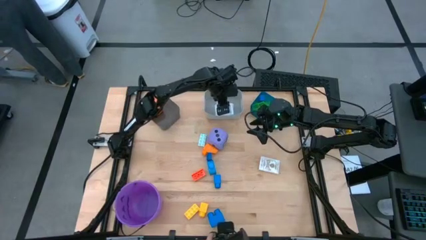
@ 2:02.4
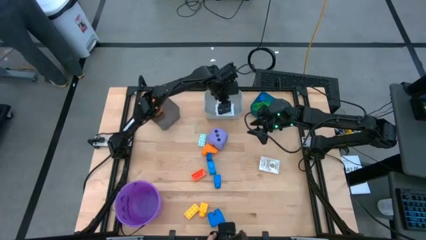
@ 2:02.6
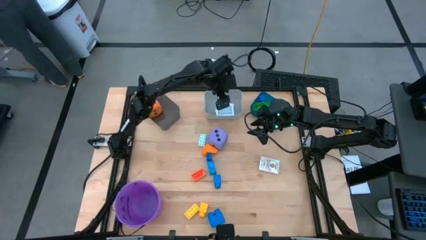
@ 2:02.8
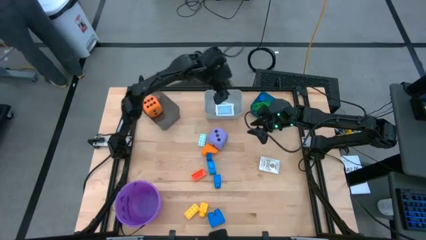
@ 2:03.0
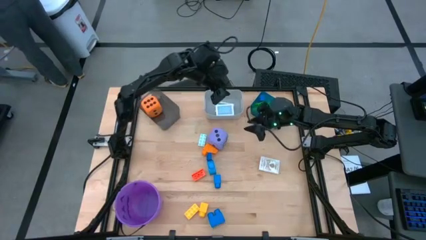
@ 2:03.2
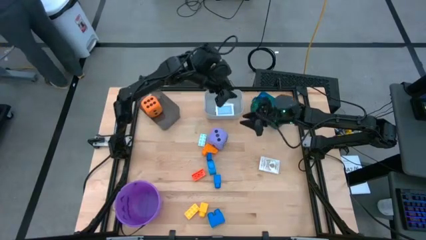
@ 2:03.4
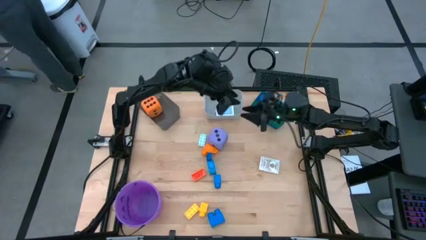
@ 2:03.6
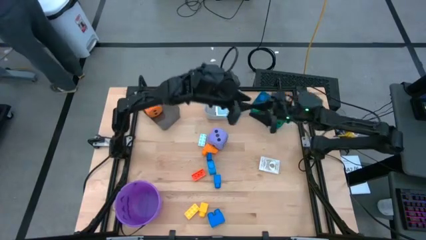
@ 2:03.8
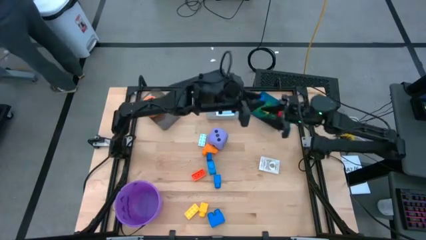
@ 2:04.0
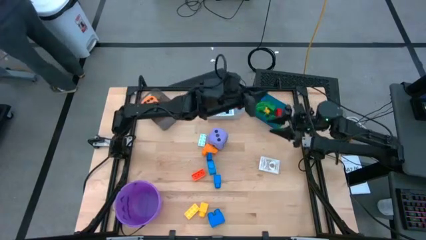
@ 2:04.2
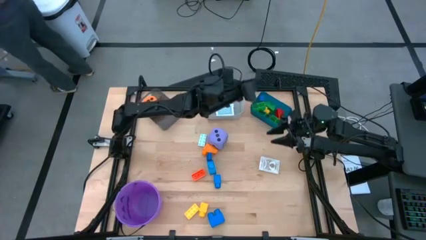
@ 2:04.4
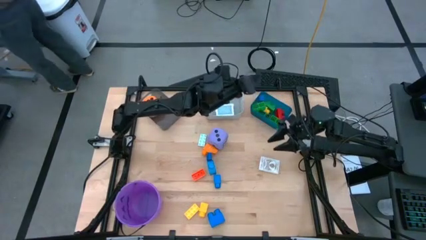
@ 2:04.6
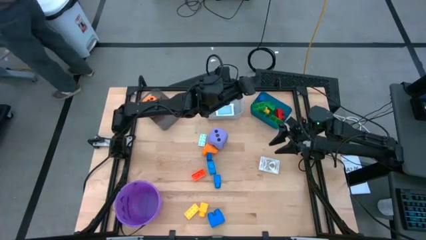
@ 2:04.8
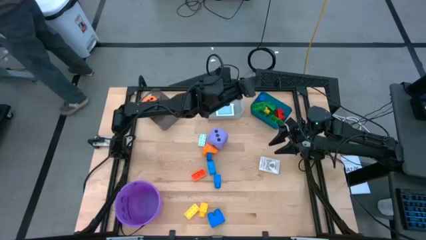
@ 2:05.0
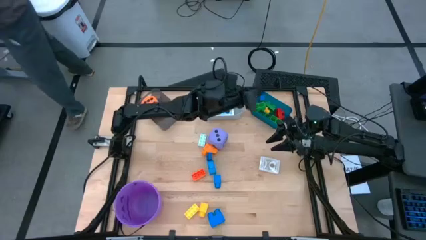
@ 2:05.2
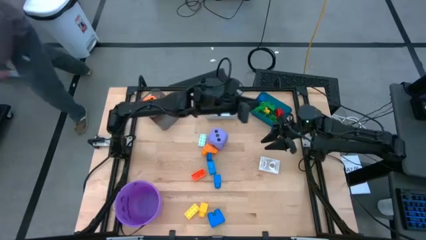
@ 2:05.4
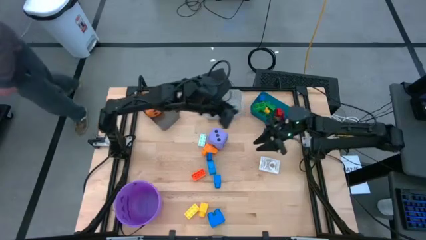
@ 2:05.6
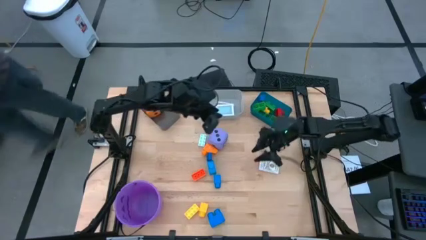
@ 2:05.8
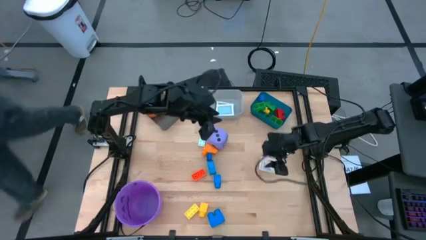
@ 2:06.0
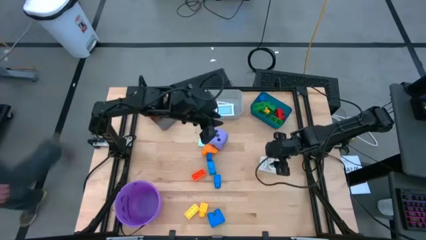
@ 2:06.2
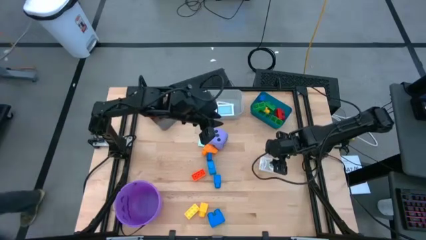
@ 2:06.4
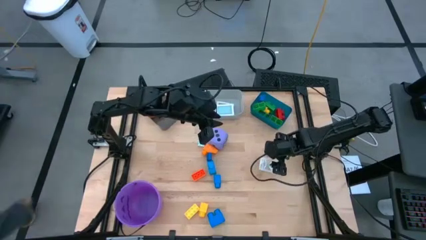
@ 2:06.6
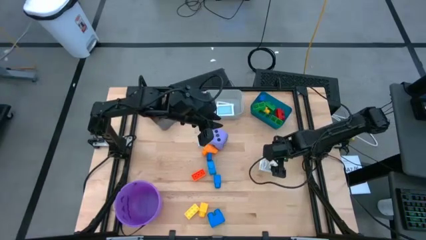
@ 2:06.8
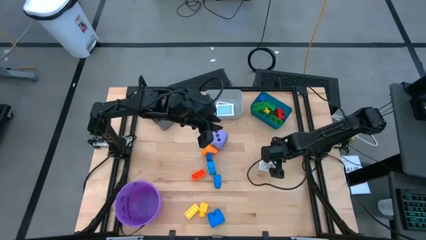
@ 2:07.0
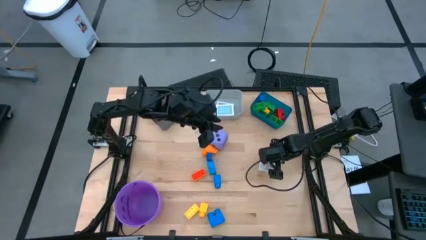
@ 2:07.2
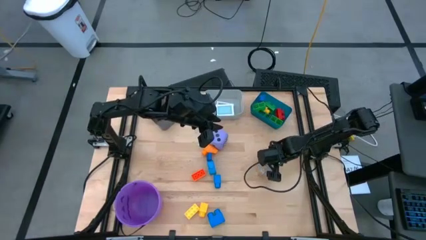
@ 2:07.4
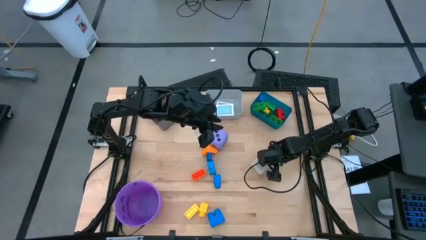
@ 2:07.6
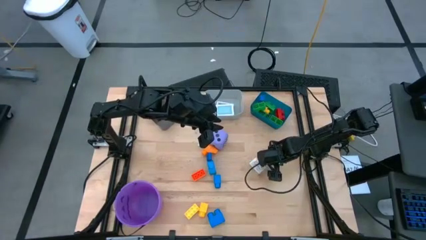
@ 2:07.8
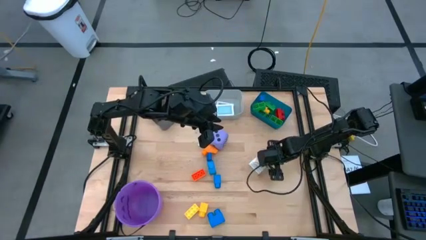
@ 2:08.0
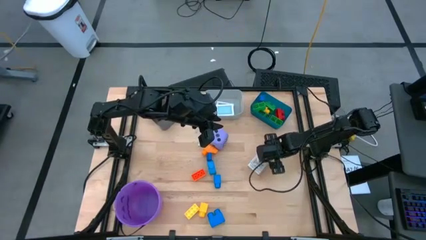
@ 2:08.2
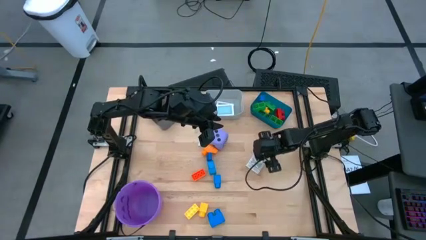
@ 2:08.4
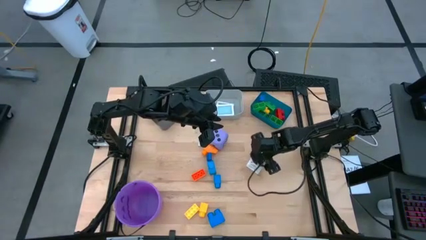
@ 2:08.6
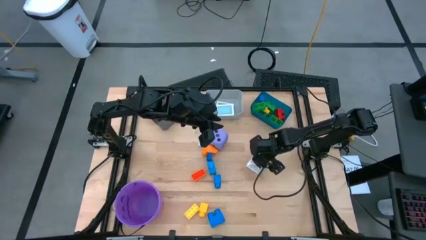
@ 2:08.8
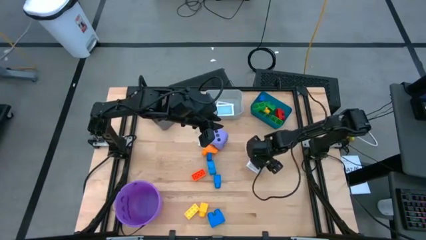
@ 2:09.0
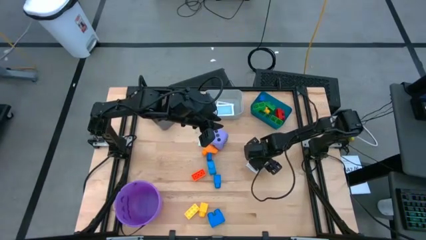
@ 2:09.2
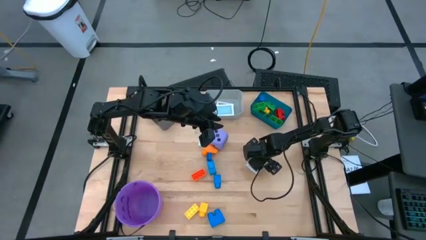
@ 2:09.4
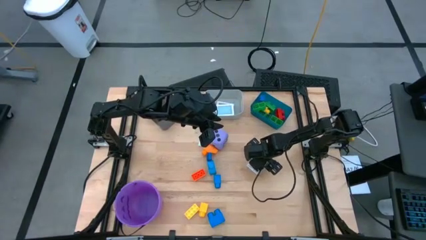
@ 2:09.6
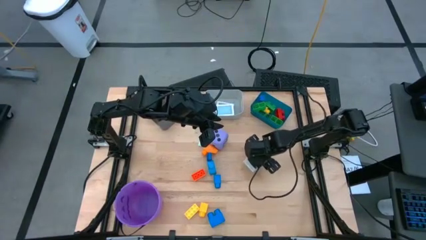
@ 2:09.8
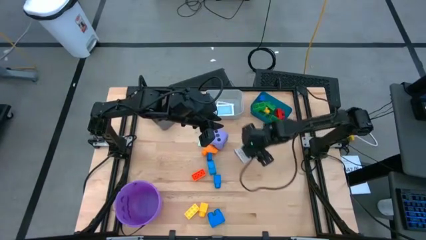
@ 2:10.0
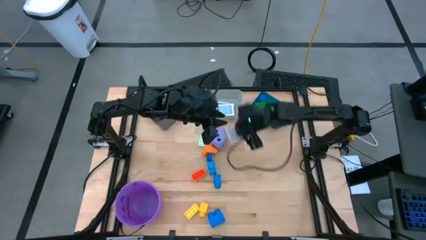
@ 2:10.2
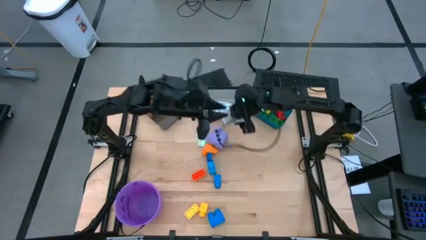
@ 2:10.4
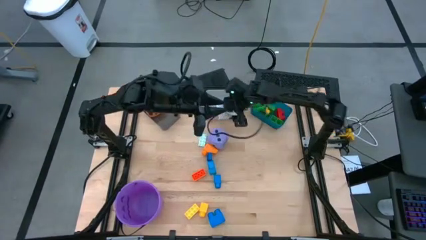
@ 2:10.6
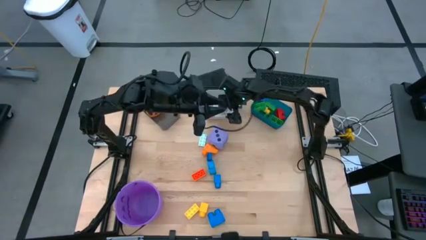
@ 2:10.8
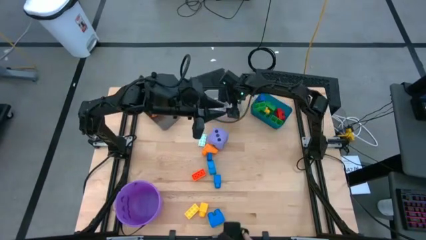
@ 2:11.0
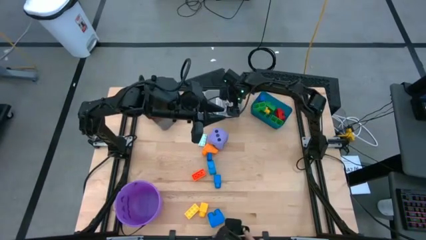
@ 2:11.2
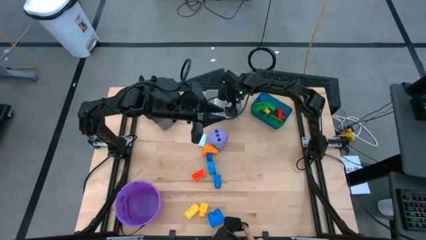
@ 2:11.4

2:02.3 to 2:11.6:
Task: Pick & Place Toys
Put the brown deck of cards into the gray bin

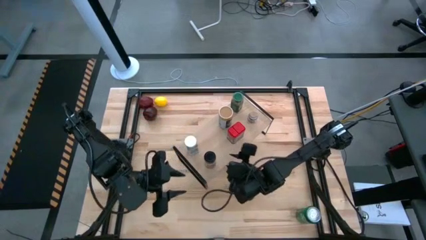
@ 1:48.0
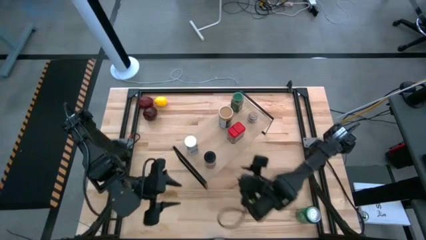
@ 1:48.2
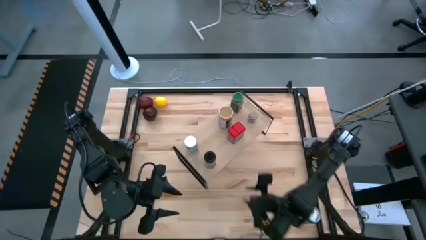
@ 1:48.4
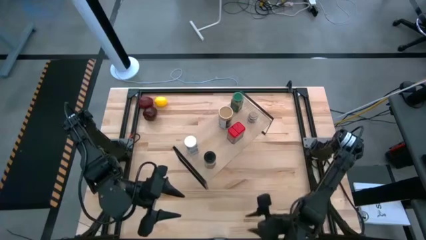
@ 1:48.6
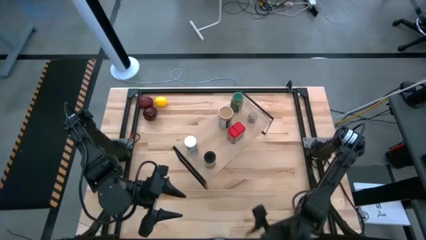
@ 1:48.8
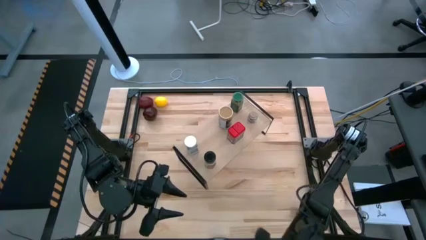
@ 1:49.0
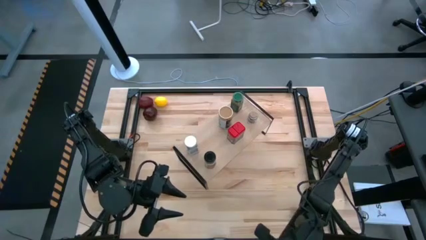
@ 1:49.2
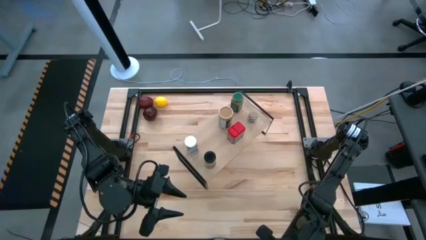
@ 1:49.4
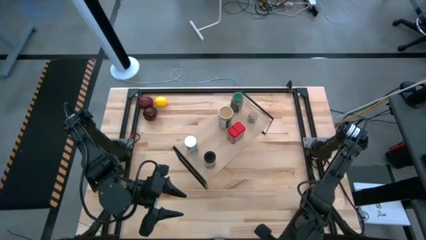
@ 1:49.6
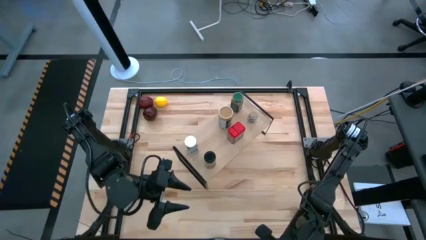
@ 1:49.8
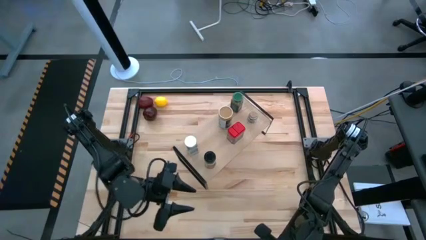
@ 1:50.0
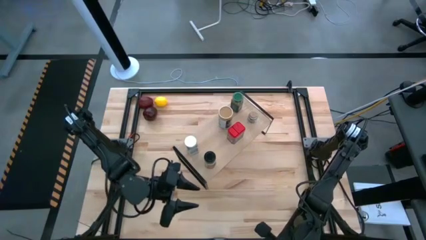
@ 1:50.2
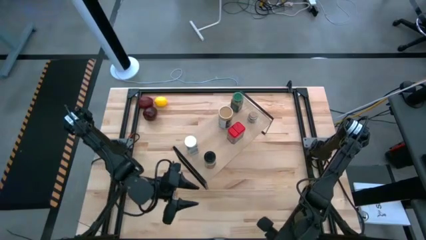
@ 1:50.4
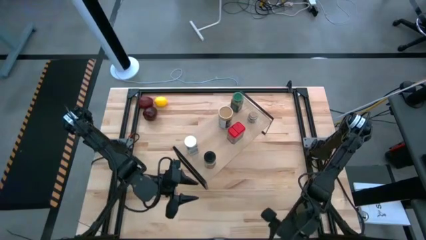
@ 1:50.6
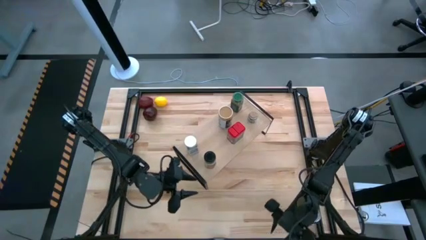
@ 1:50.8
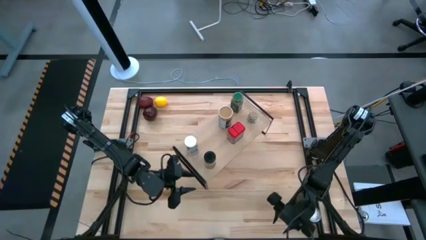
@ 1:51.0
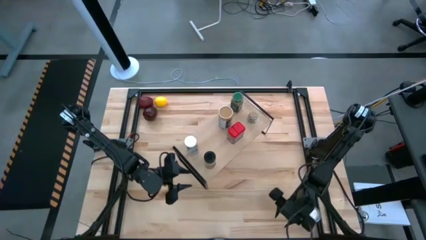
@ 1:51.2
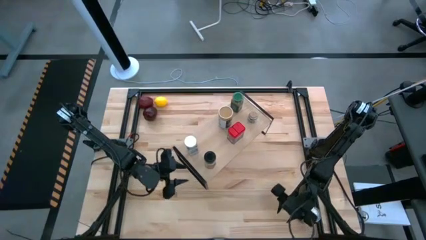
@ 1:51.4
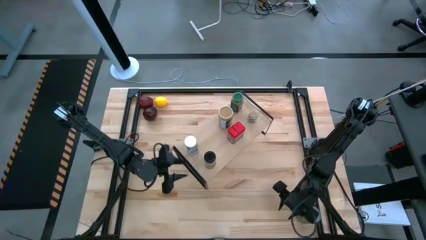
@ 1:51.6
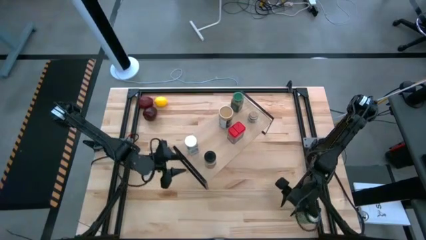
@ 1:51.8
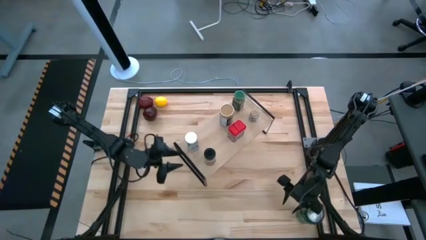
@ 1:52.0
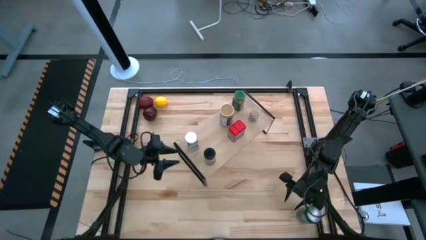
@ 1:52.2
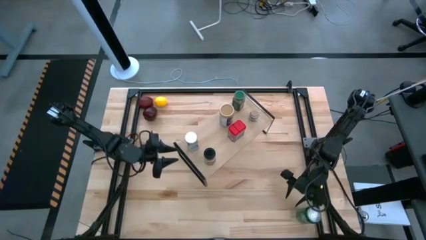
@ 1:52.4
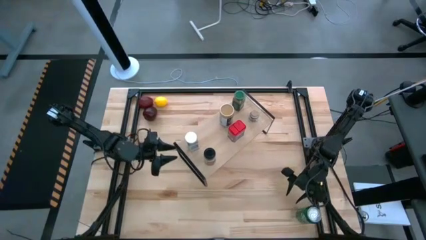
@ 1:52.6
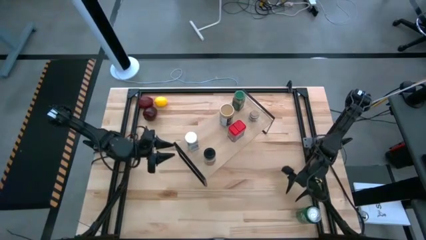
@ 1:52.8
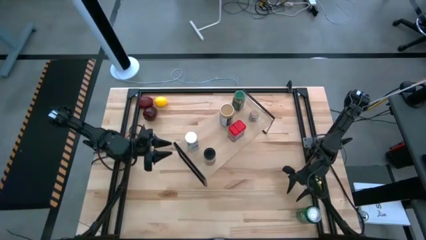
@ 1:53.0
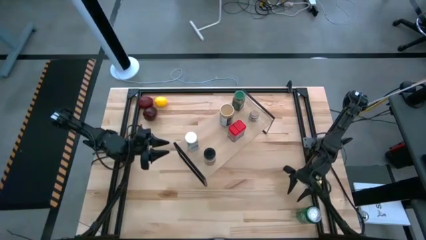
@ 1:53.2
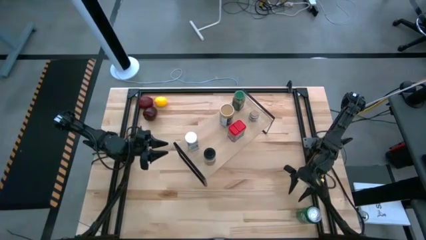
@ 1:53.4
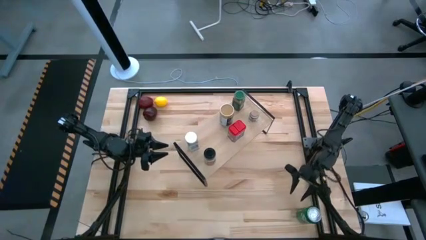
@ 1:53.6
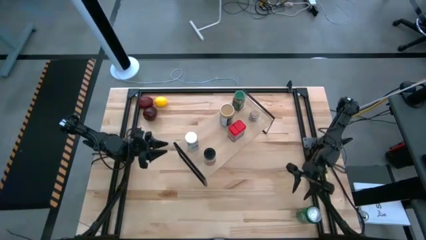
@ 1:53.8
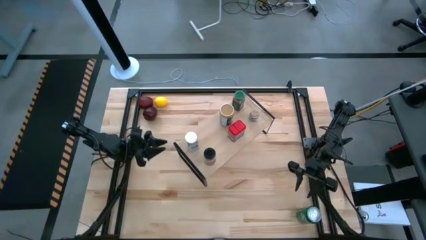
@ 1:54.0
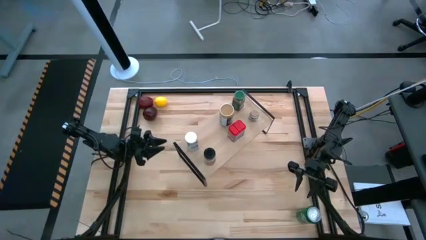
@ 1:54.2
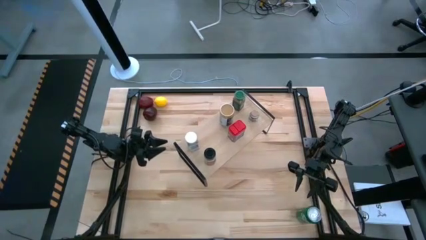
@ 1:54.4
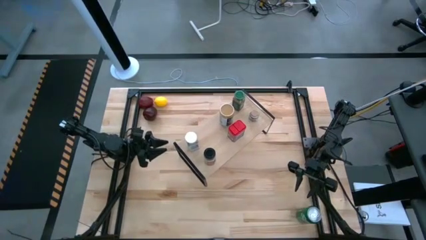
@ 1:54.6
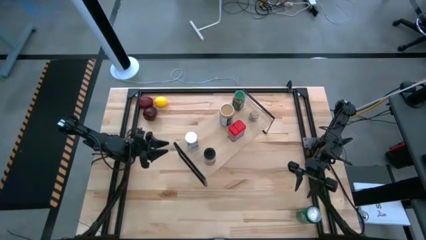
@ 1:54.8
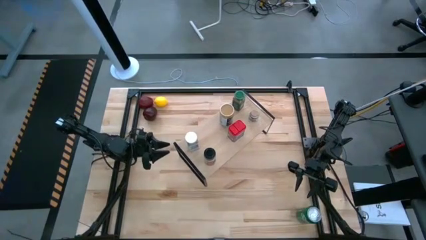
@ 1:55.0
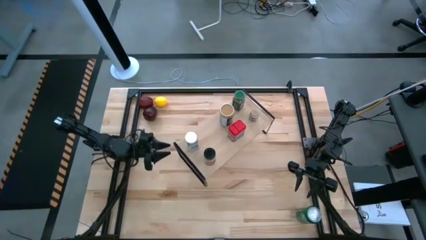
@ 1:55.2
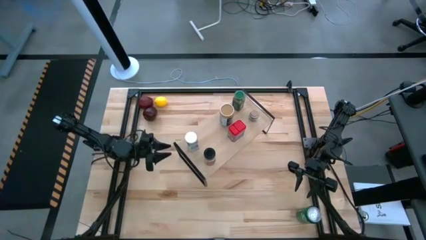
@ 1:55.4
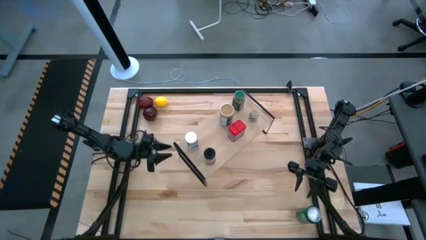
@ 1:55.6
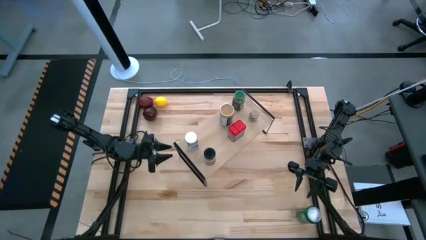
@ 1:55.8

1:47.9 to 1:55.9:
Task: Shelf spices
Return to Home Position
